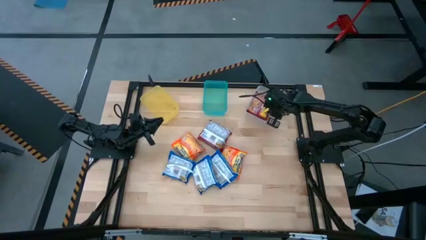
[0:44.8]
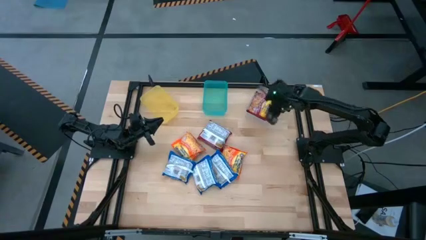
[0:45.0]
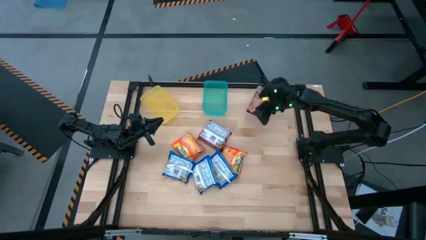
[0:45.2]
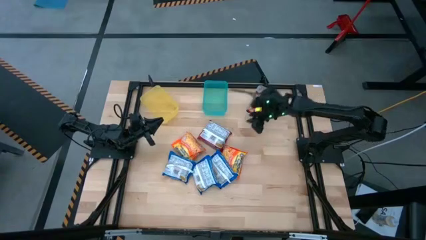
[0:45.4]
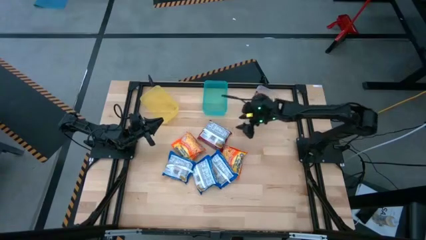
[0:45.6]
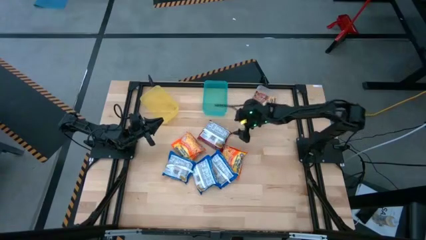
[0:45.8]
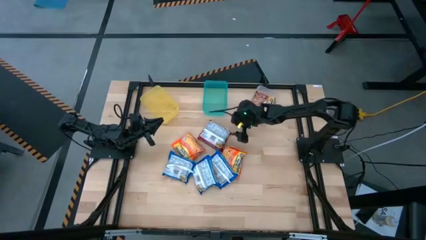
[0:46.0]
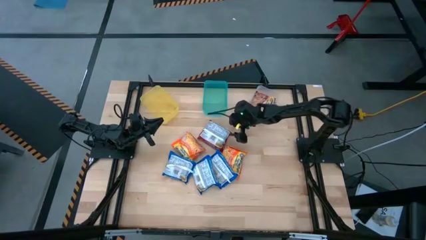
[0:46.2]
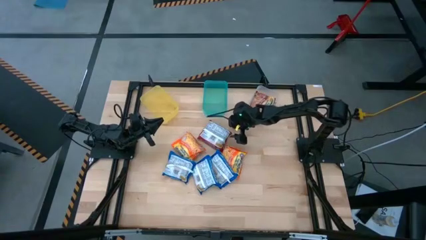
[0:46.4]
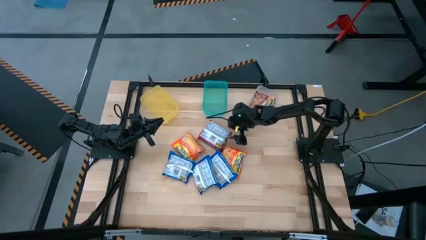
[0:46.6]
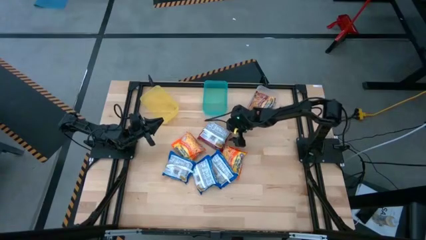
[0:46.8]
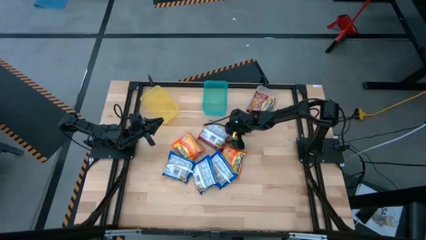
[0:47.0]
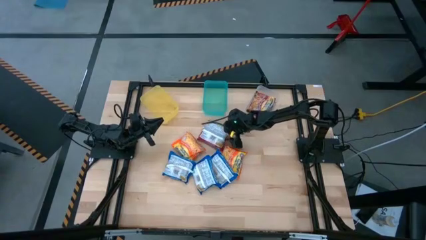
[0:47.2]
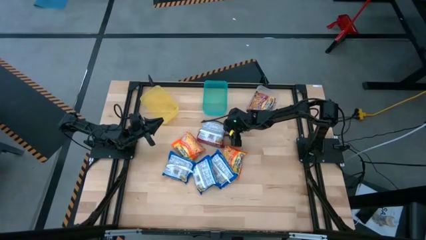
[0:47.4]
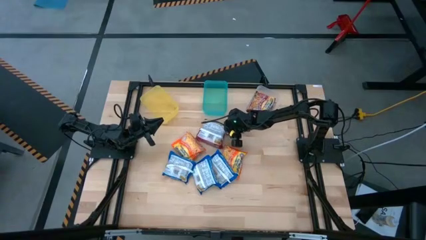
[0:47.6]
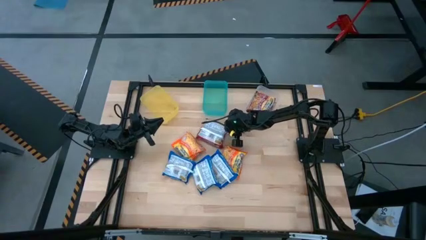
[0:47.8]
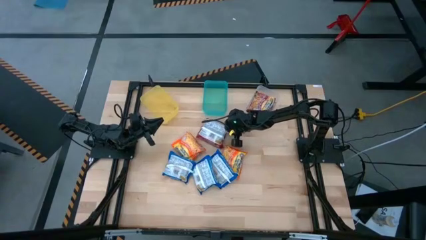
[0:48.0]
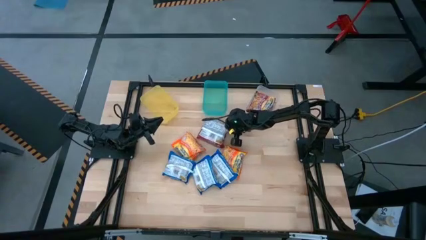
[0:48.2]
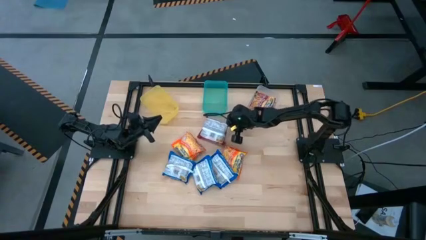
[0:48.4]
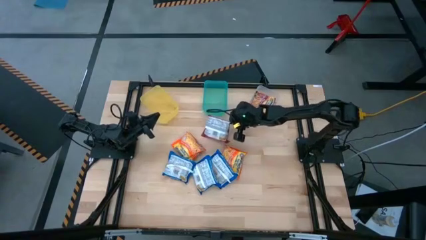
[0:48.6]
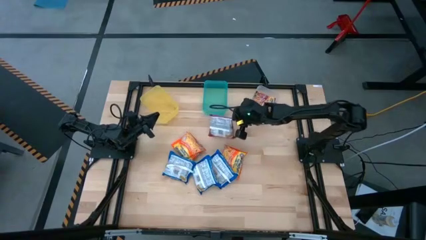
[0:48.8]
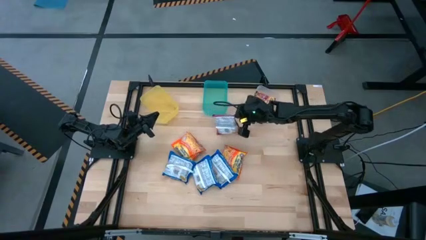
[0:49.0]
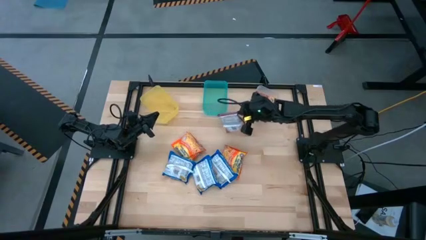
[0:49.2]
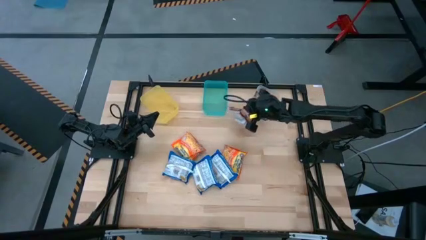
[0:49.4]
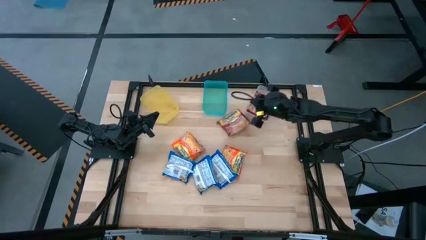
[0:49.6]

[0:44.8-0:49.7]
Task: Sort Maruchan noodles
Put the red noodle pack into the transparent bin

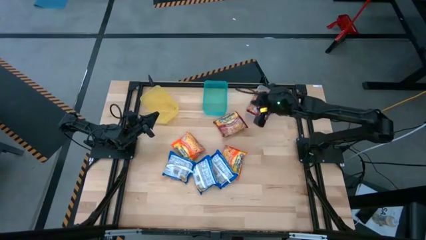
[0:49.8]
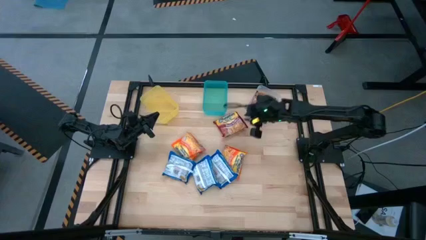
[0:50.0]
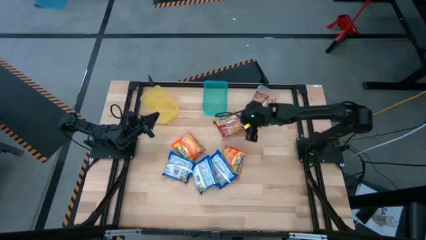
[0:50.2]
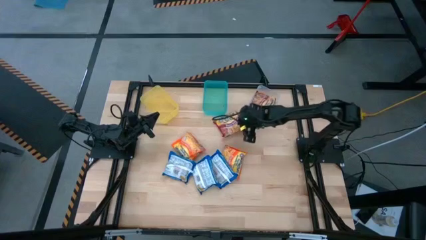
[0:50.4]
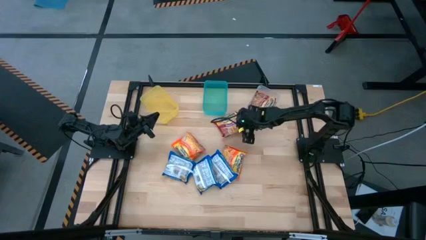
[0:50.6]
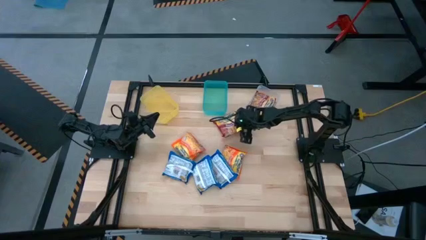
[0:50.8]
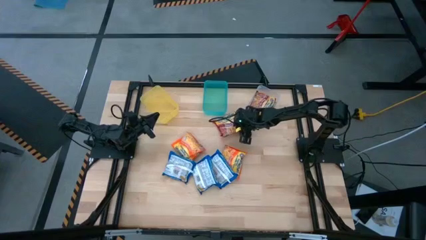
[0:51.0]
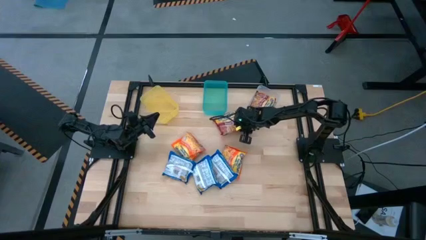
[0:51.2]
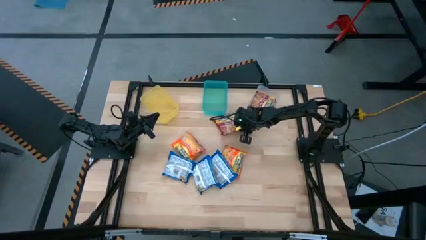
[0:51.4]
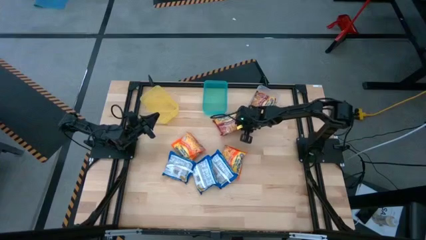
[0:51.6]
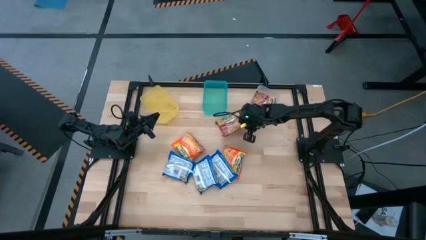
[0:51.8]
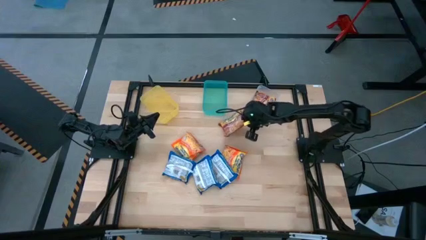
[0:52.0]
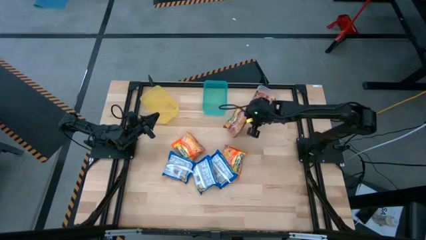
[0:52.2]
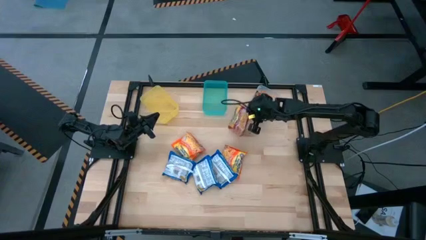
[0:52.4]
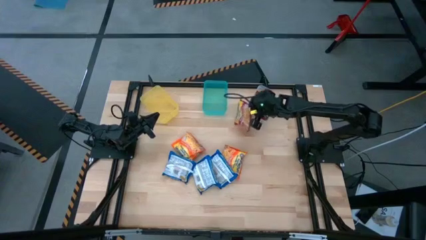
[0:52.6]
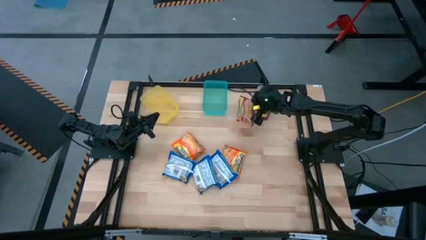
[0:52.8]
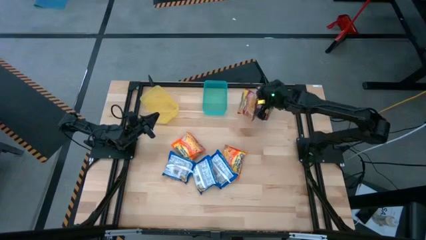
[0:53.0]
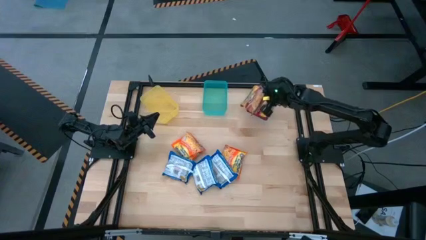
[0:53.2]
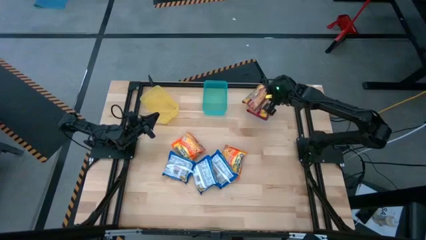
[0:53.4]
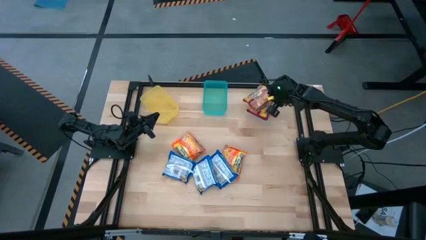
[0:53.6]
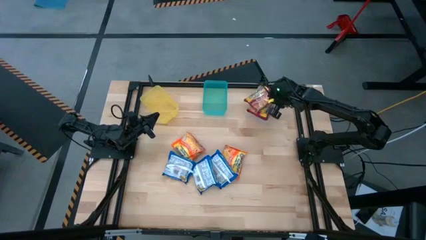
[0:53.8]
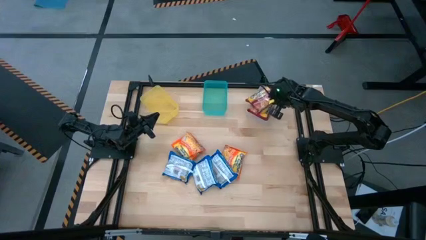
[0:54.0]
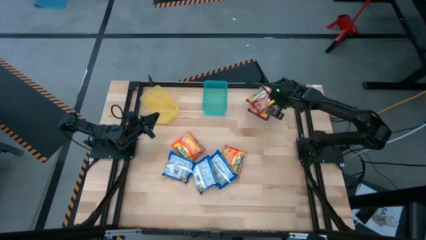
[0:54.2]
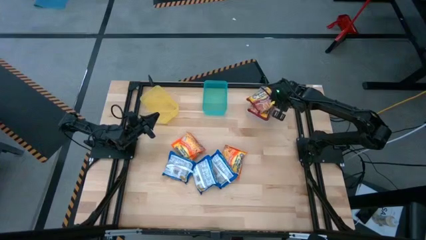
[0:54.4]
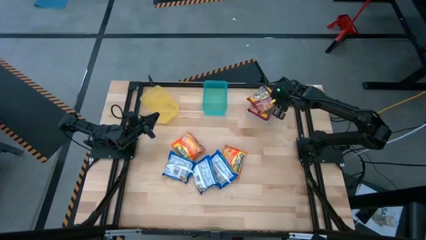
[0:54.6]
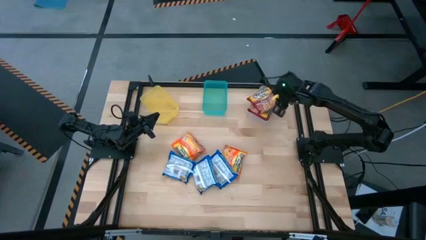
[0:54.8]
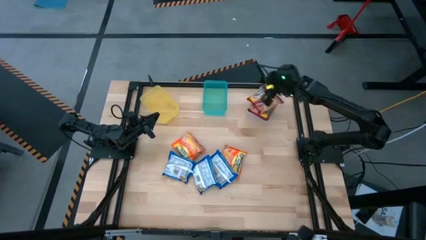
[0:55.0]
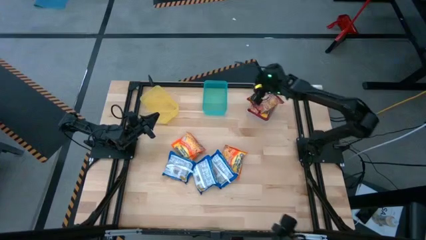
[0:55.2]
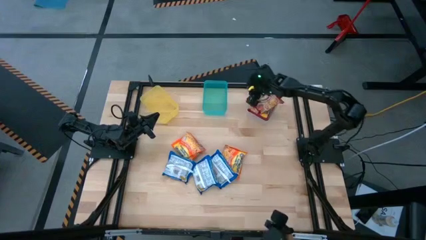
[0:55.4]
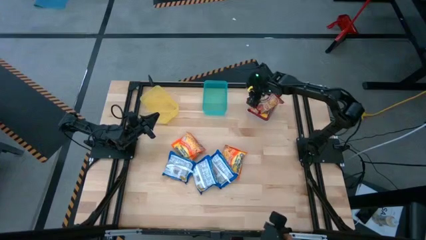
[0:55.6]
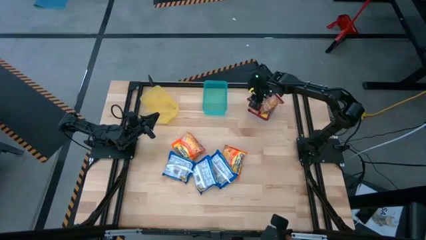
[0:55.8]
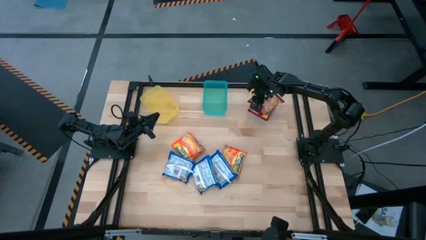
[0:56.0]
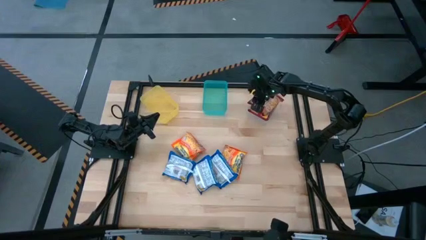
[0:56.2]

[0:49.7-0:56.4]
Put the red noodle pack into the transparent bin

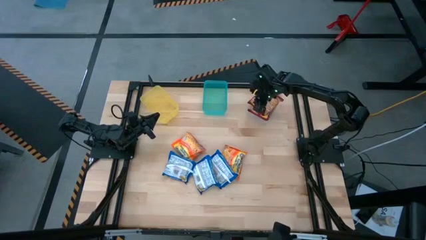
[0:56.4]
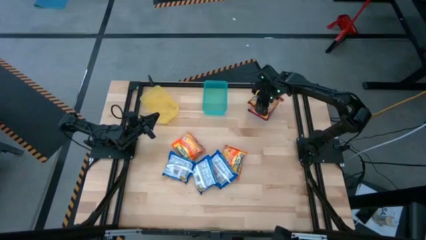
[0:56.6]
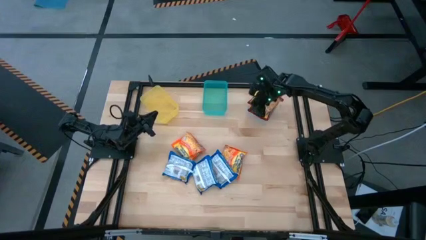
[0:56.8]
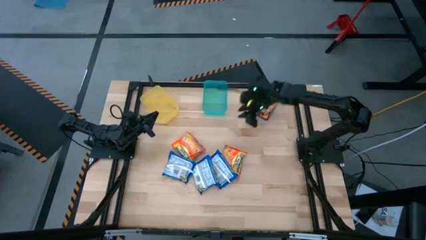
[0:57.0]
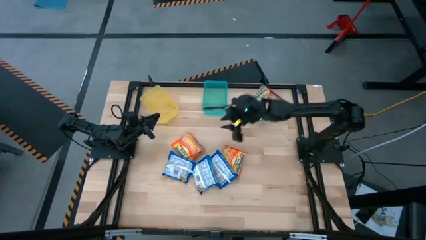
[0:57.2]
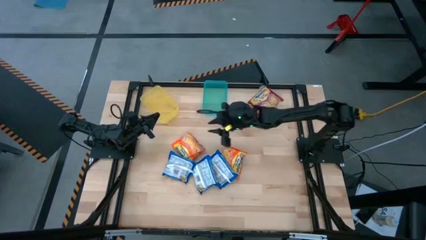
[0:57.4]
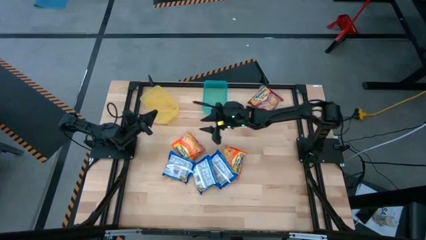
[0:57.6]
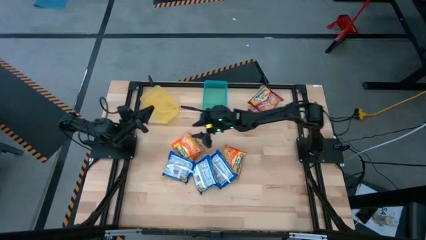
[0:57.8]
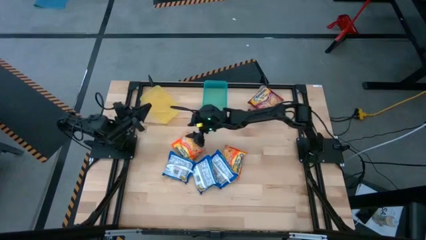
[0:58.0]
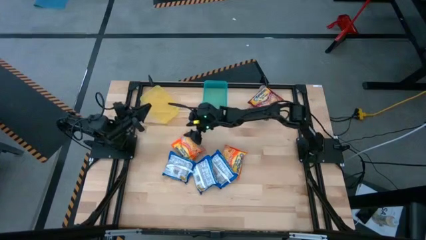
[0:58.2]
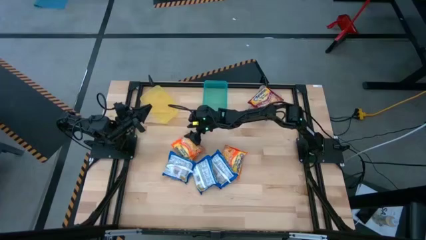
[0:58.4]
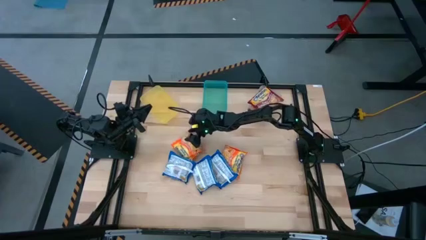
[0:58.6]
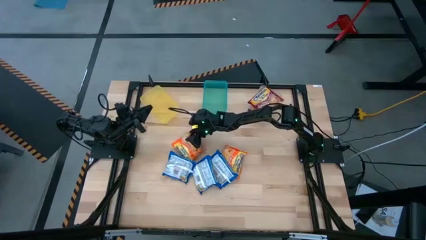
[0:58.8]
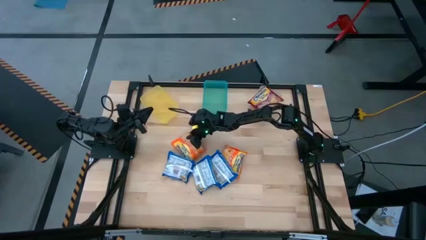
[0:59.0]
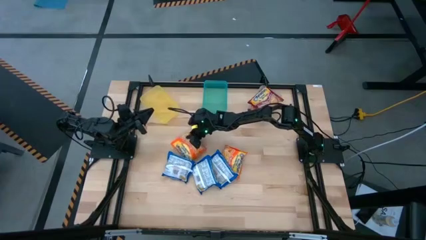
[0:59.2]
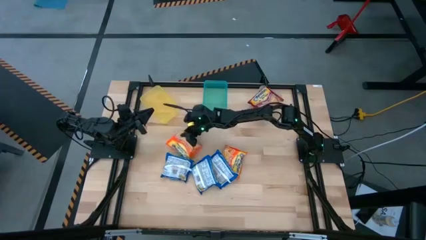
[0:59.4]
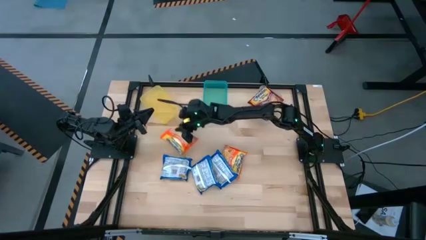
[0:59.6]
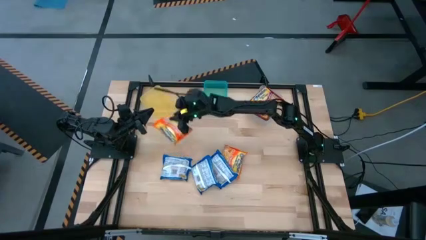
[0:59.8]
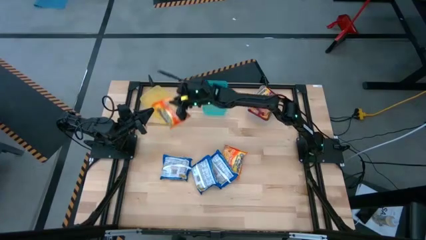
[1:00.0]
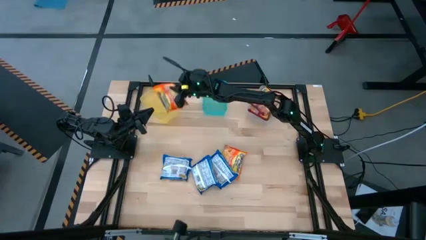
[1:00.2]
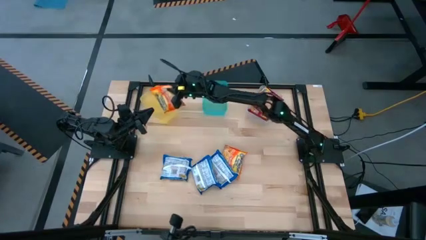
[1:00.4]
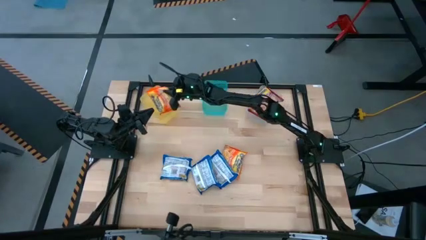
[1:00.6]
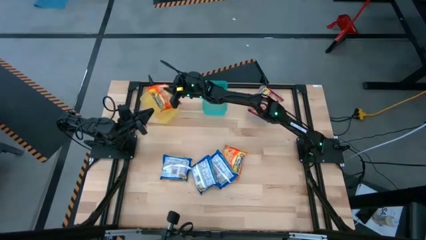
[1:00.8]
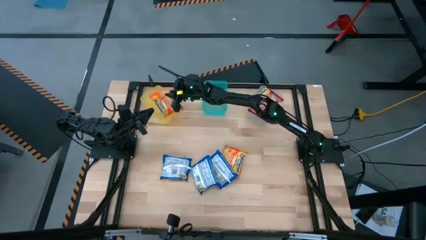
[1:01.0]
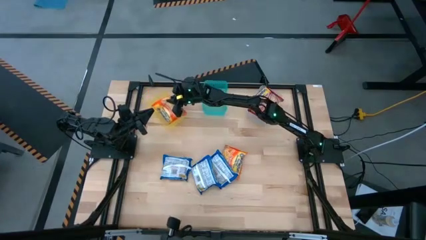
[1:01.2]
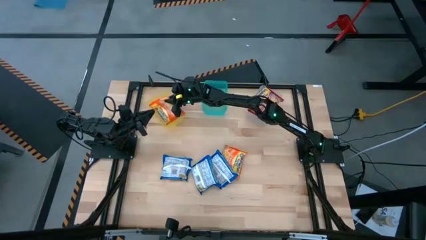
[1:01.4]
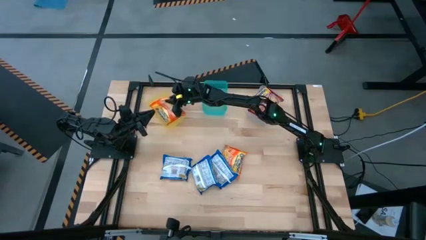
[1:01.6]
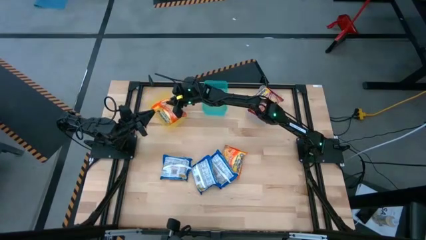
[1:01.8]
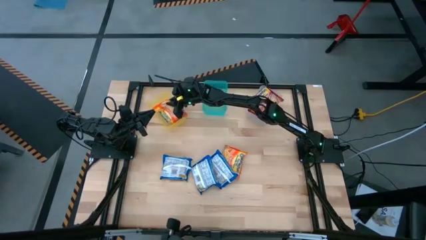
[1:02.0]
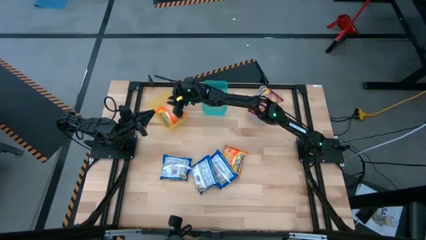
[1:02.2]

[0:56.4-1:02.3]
Put the left orange noodle pack into the yellow bin
